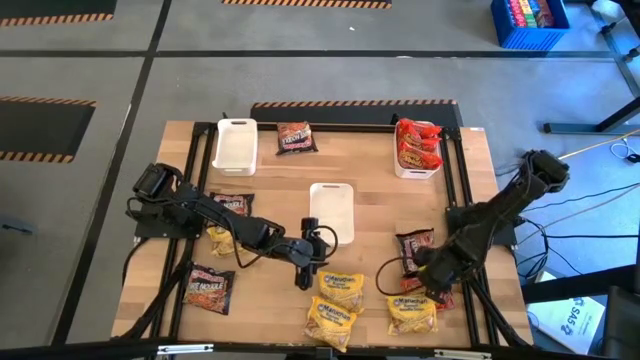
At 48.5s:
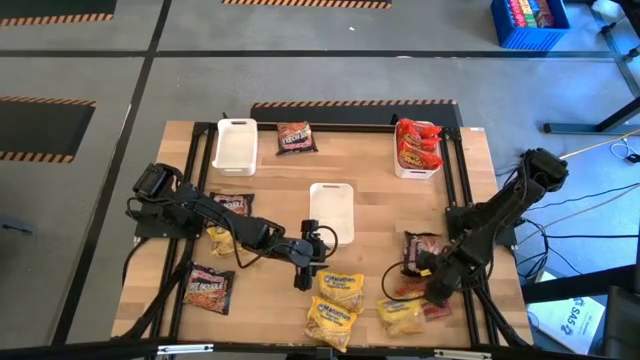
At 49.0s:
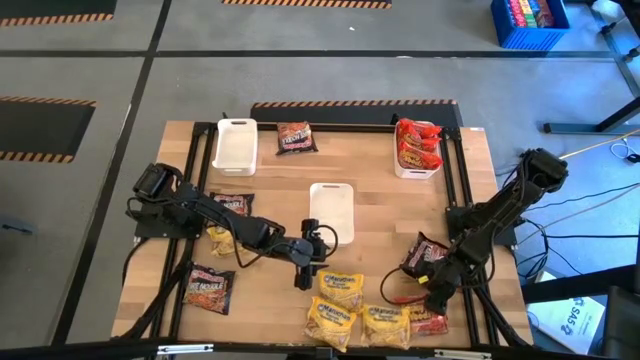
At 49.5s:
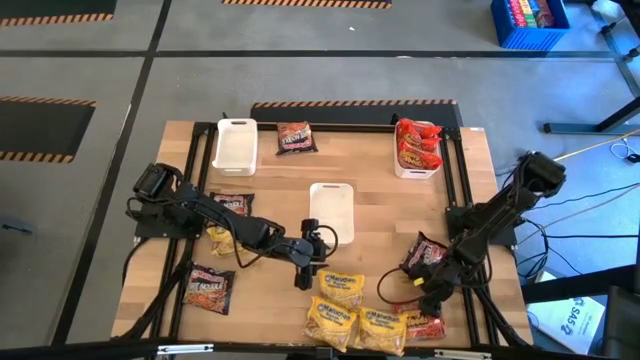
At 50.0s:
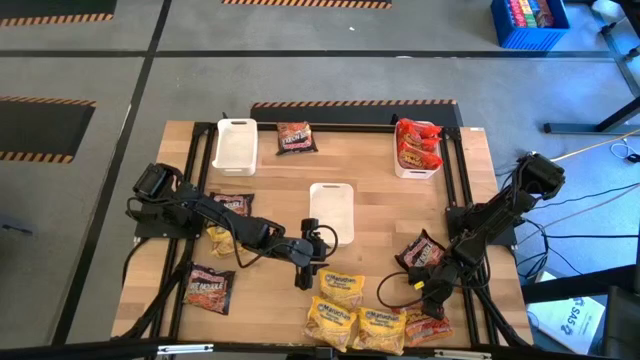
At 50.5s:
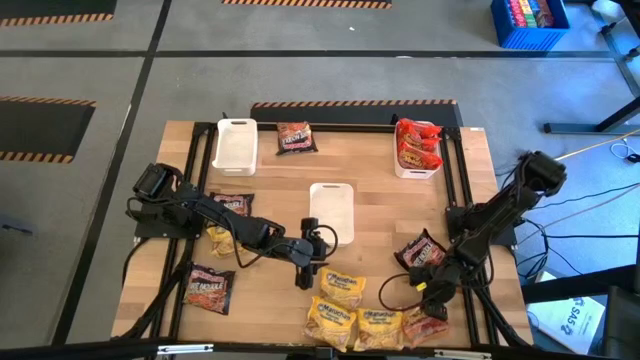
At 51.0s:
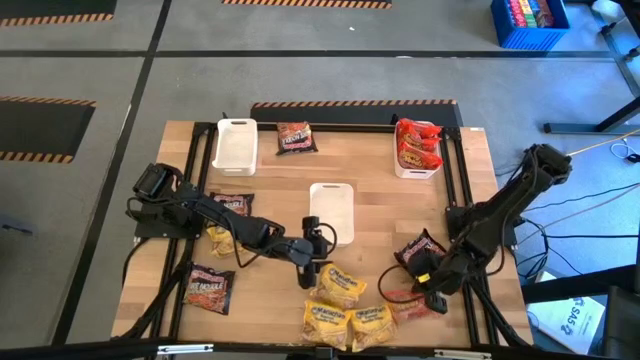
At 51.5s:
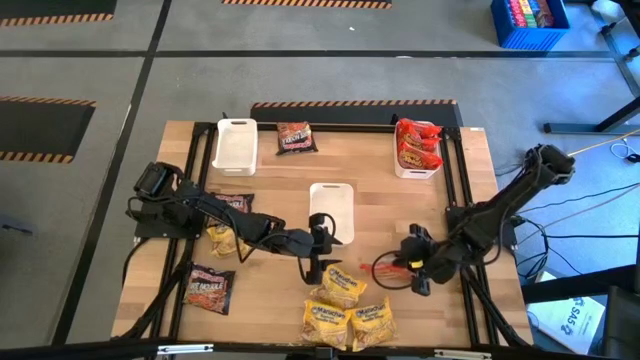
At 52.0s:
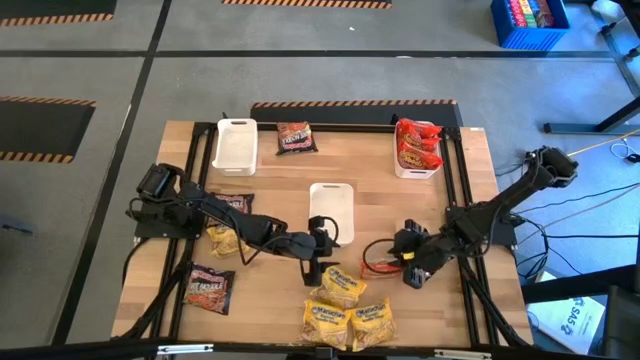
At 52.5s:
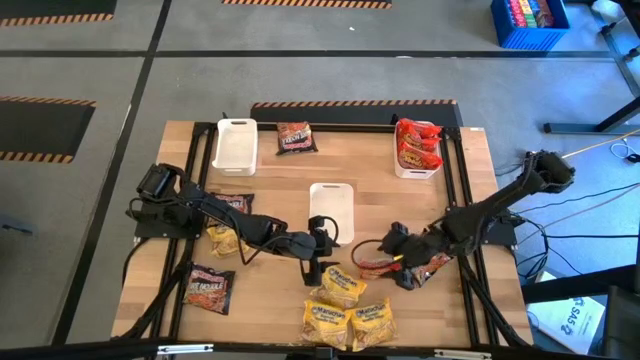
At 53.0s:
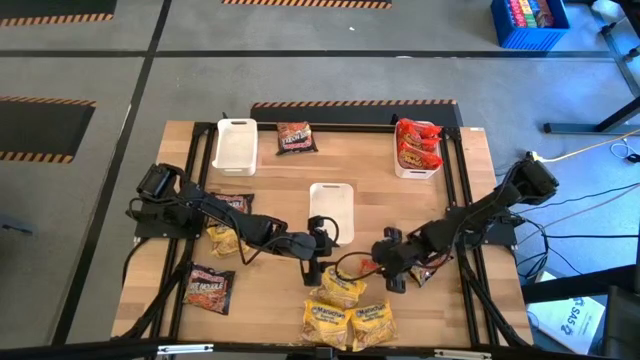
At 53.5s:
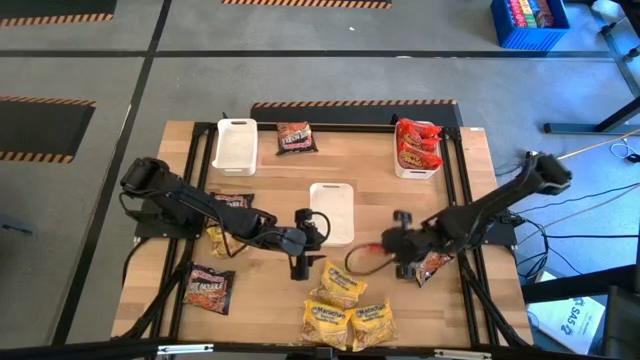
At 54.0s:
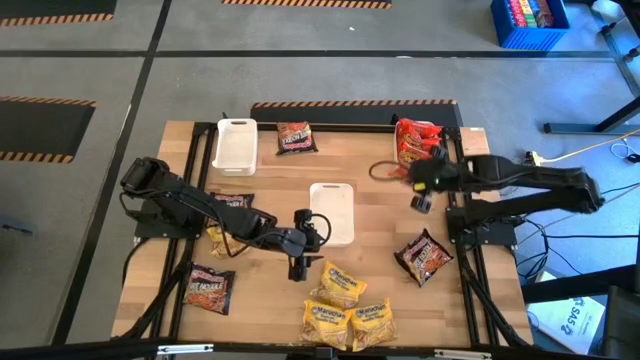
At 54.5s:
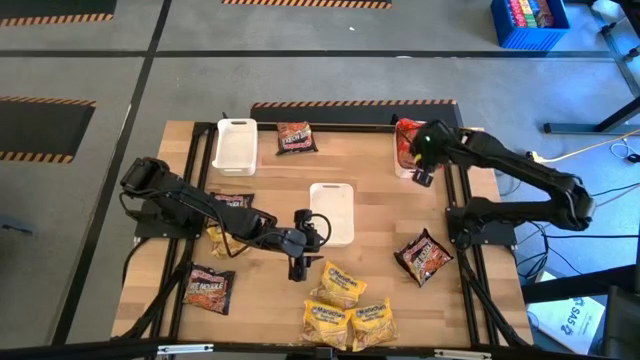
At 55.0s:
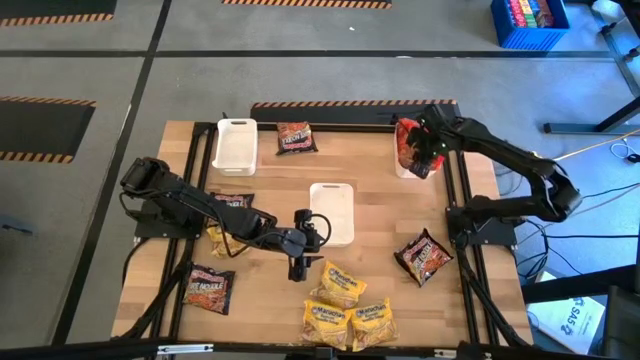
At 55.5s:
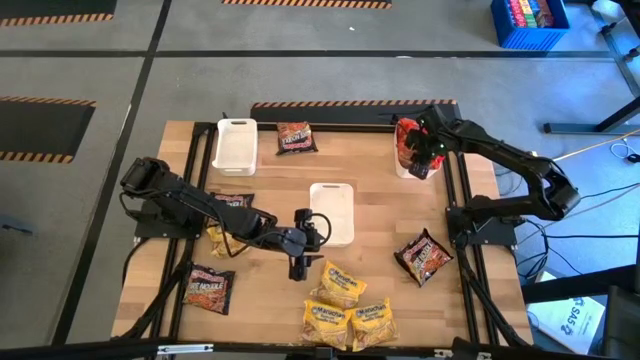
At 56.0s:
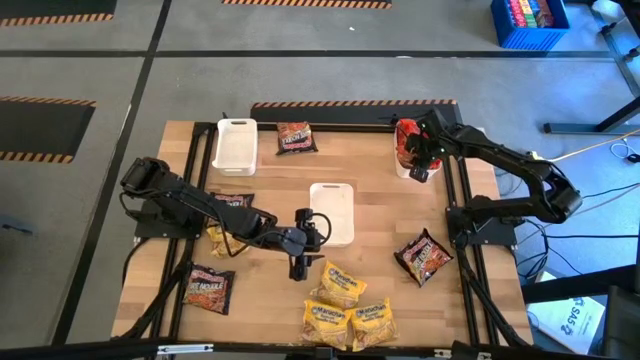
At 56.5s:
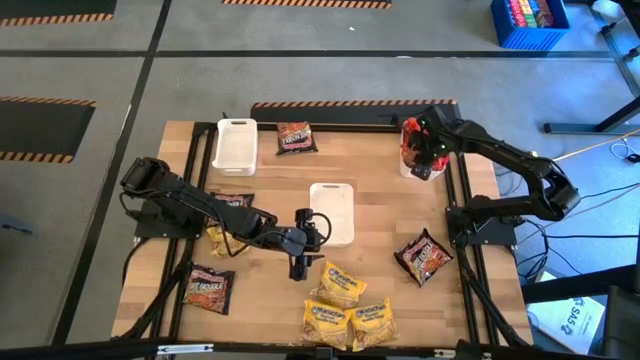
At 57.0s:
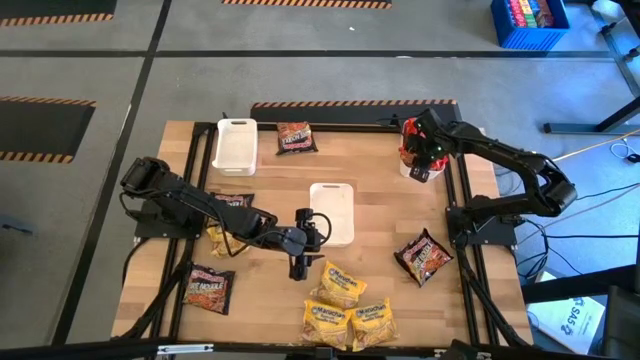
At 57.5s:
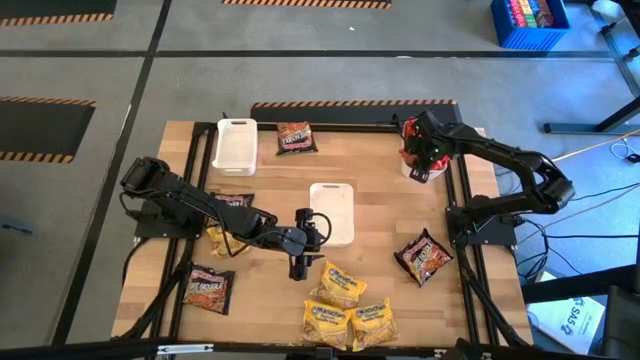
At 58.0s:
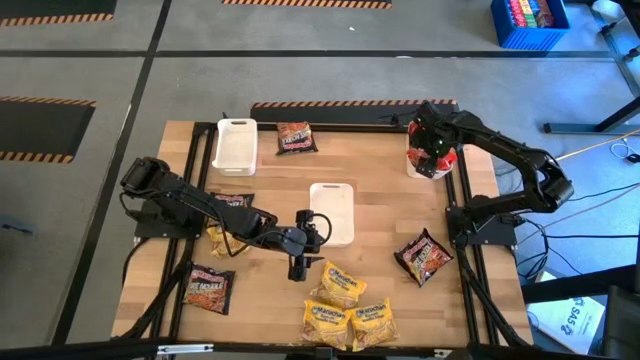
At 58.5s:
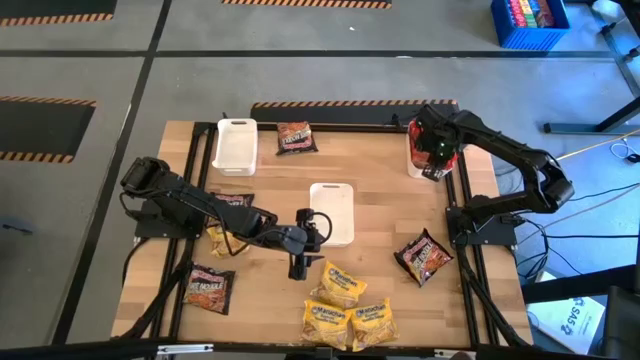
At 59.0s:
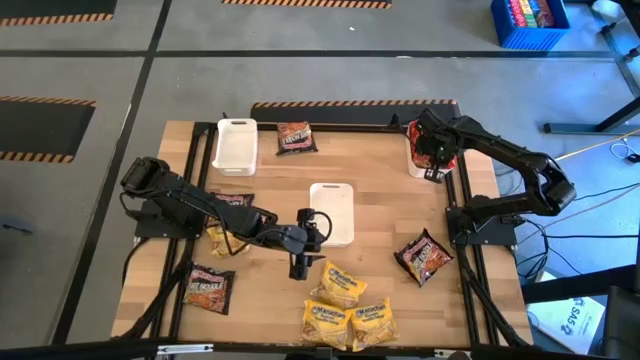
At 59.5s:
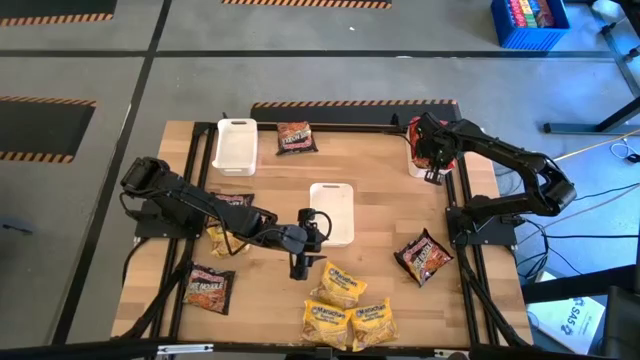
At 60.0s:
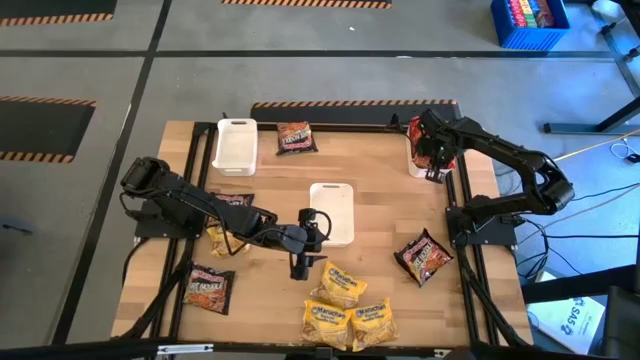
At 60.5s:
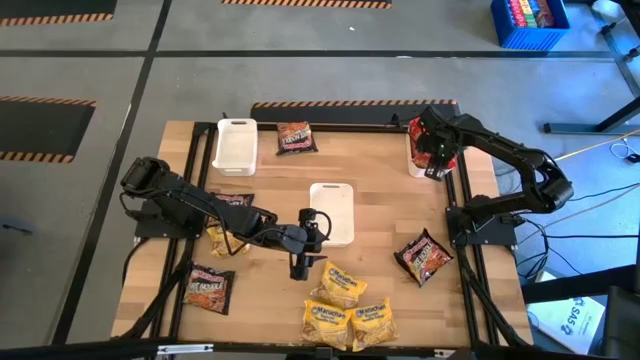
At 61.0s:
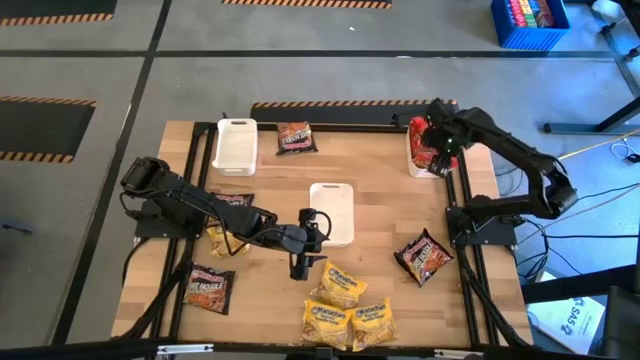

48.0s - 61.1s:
Task: Sort Maruchan noodles
Put the orange noodle pack into the white right bin

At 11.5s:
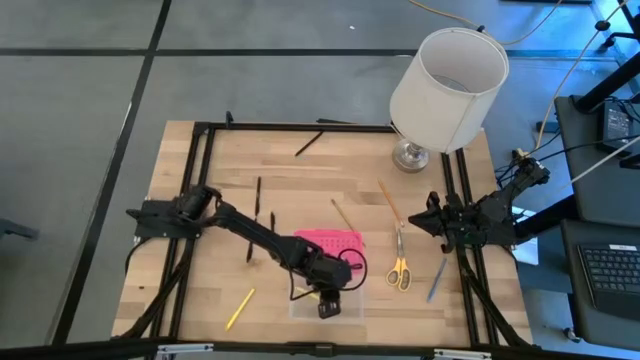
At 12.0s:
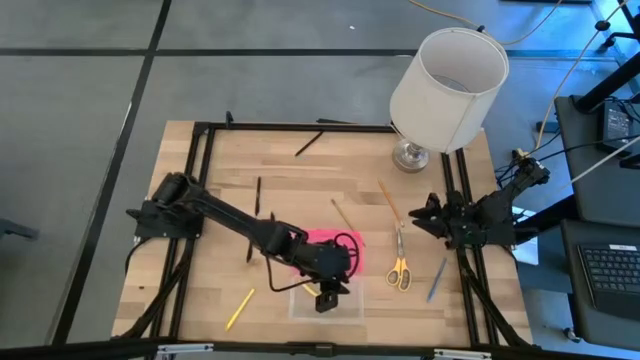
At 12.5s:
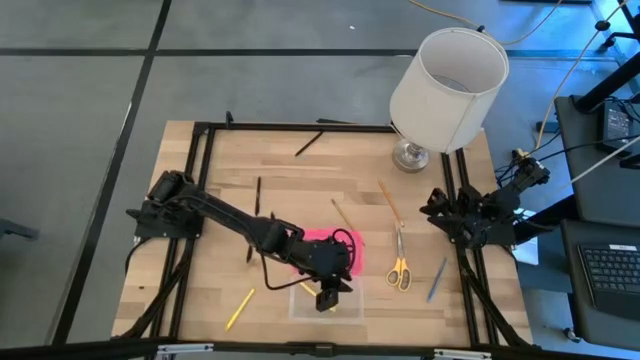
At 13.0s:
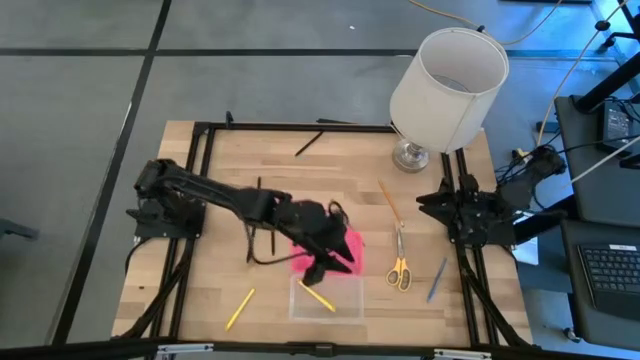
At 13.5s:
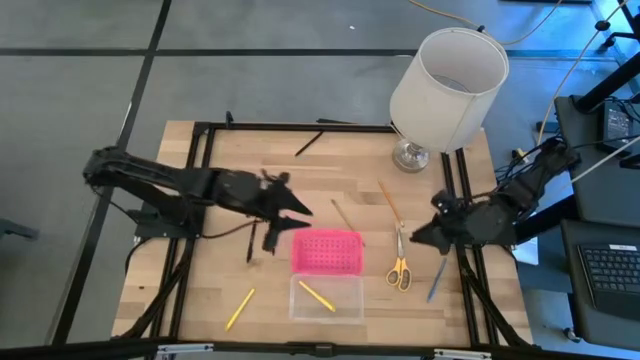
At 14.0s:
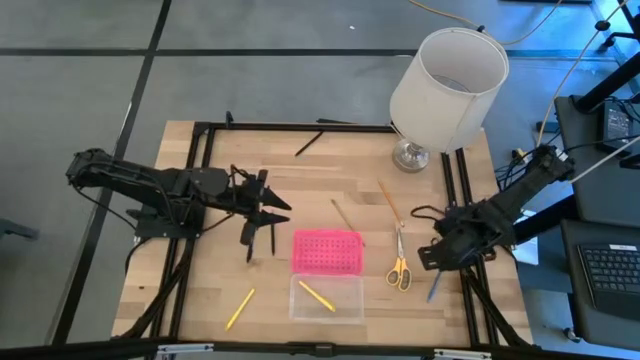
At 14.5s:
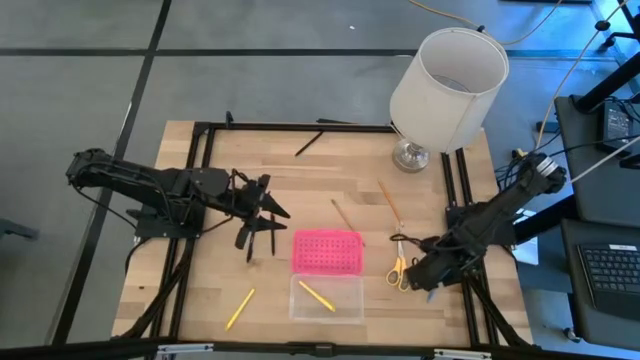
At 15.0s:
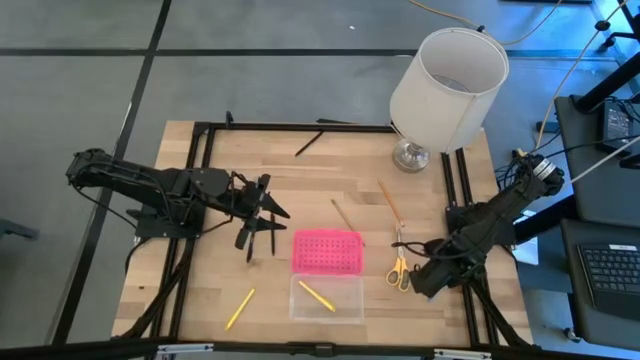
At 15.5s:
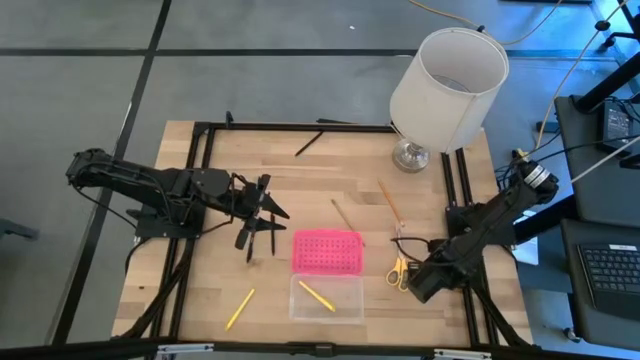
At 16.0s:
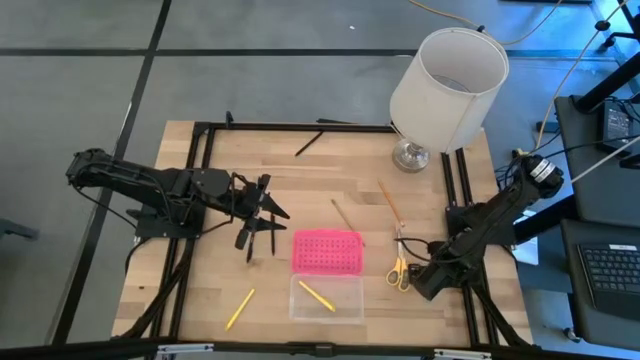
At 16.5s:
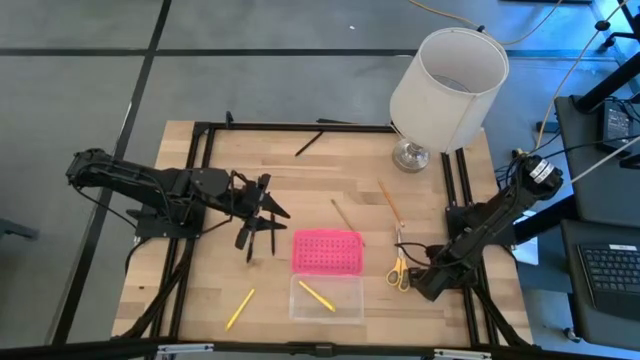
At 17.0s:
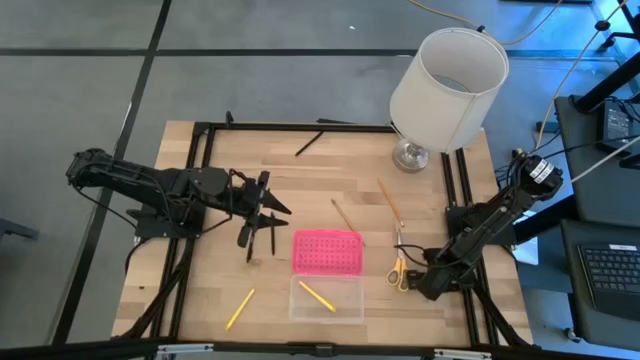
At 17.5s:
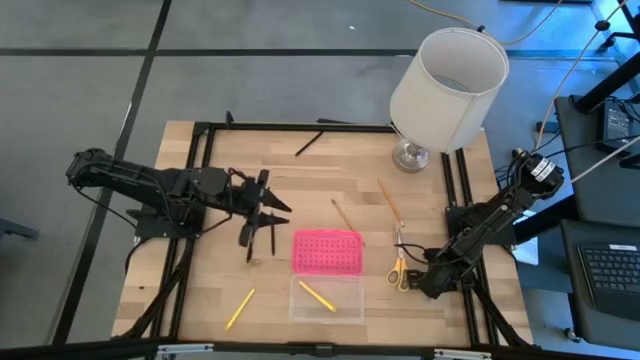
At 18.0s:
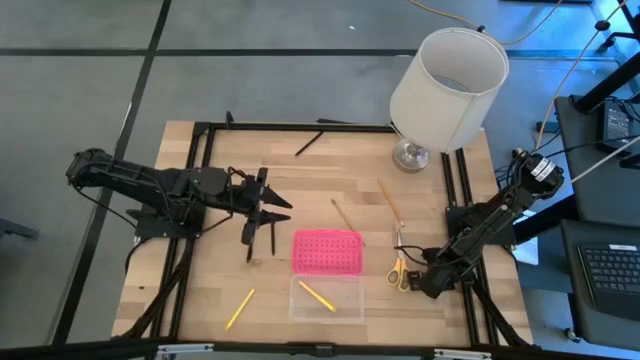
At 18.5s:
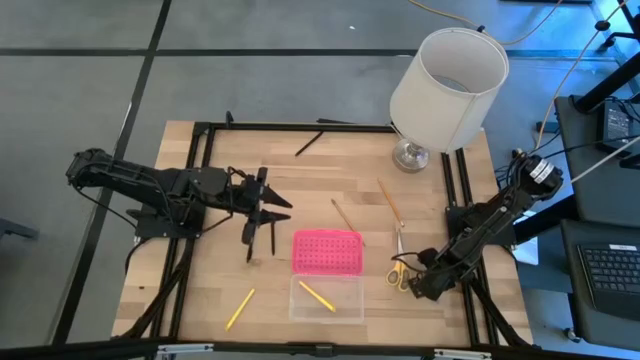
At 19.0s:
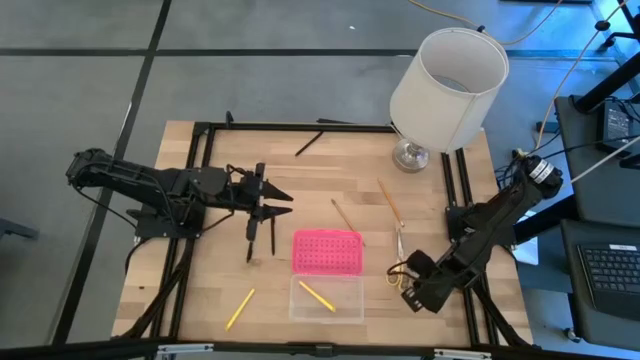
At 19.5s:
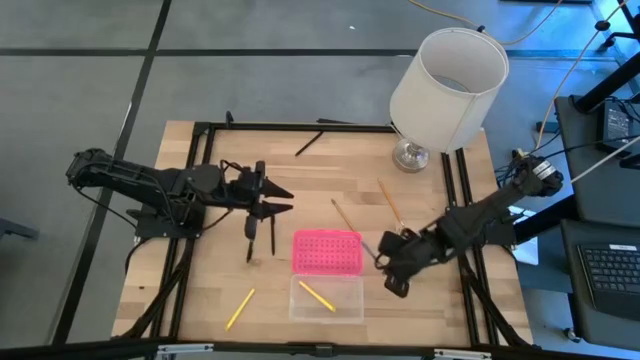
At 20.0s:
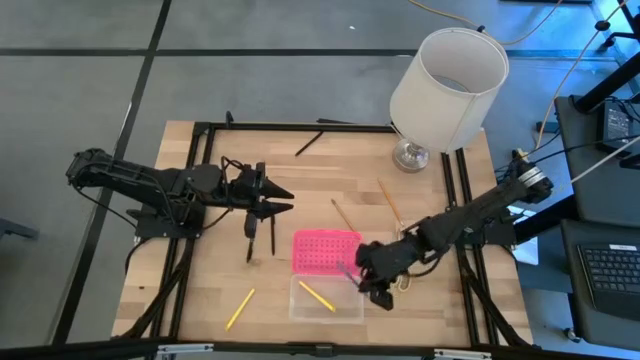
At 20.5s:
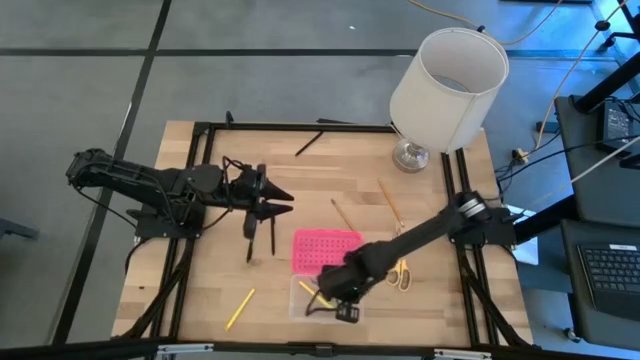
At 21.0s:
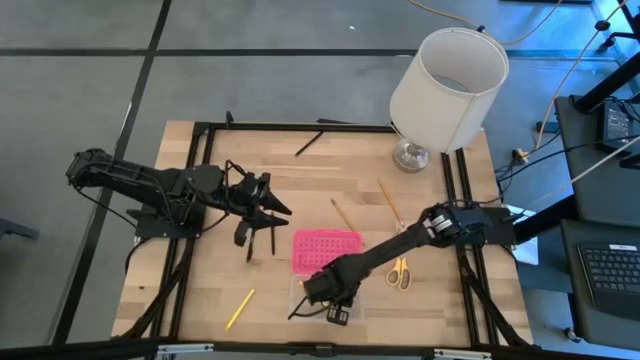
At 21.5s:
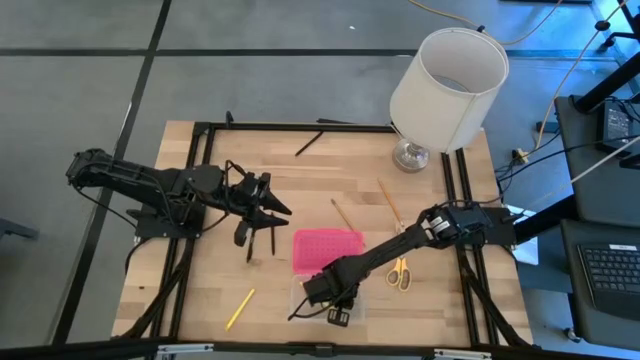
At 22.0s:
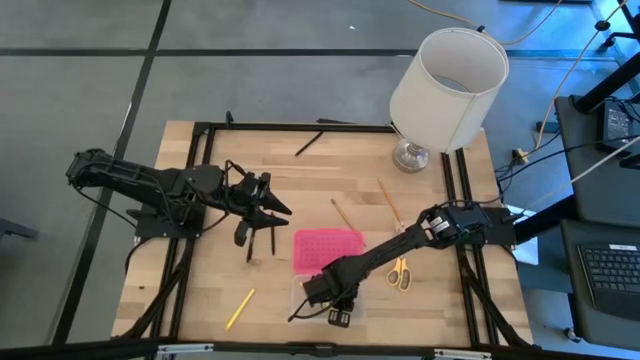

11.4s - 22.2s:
Task: Pick & place school supplies into a supply box
Put the blue pen into the pink supply box
